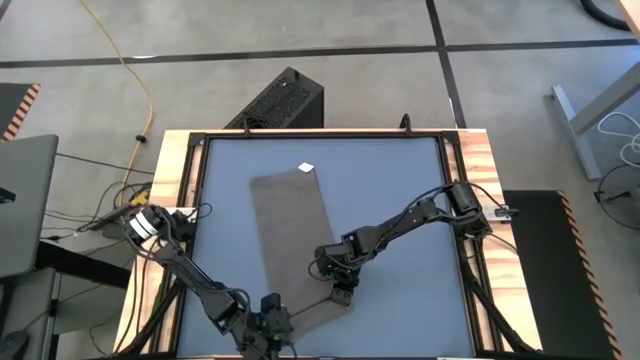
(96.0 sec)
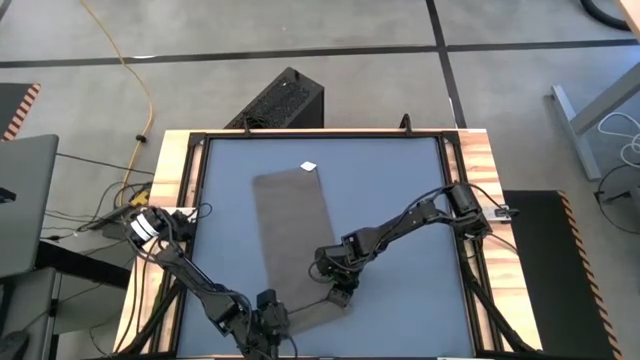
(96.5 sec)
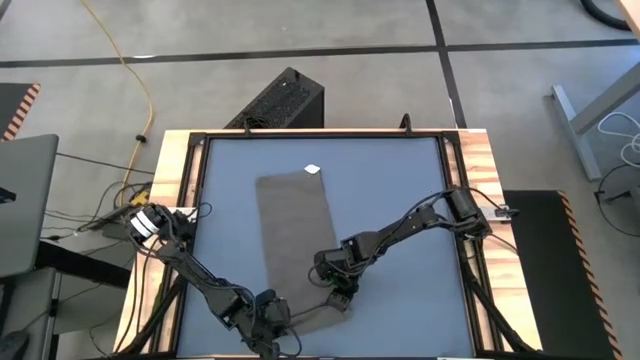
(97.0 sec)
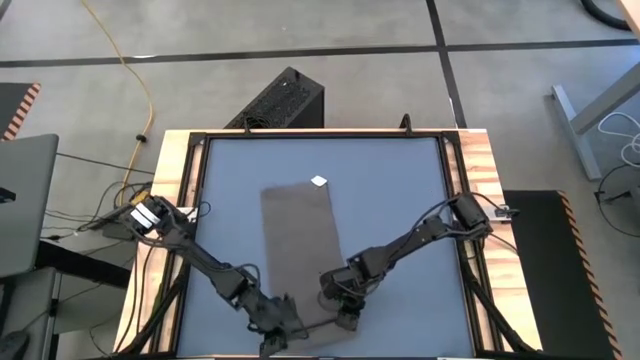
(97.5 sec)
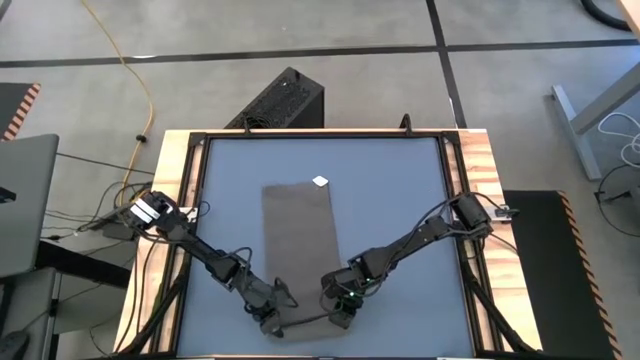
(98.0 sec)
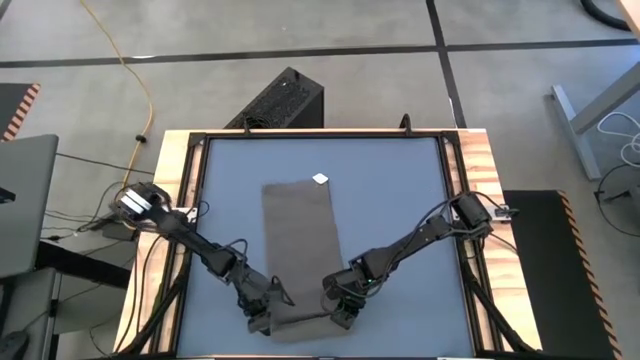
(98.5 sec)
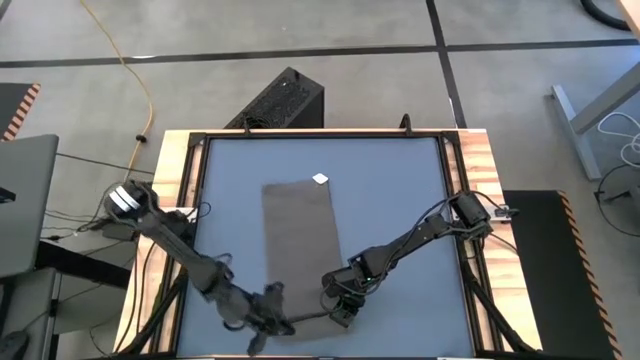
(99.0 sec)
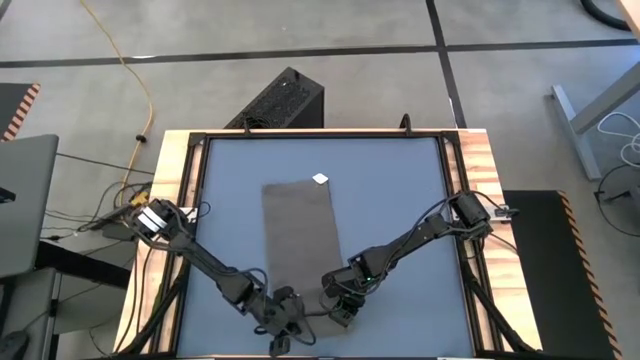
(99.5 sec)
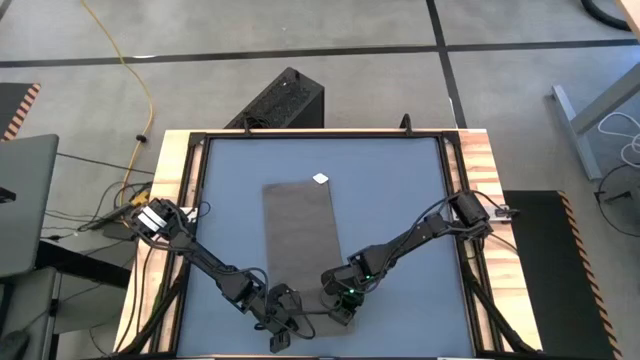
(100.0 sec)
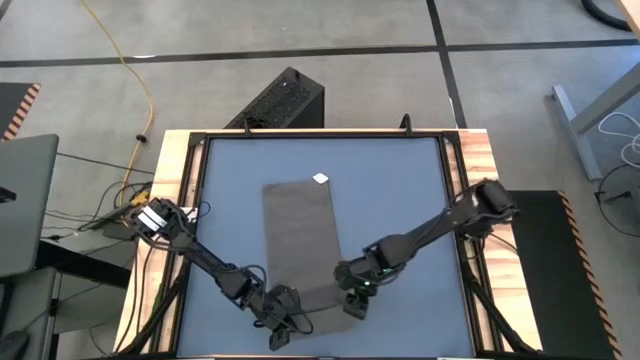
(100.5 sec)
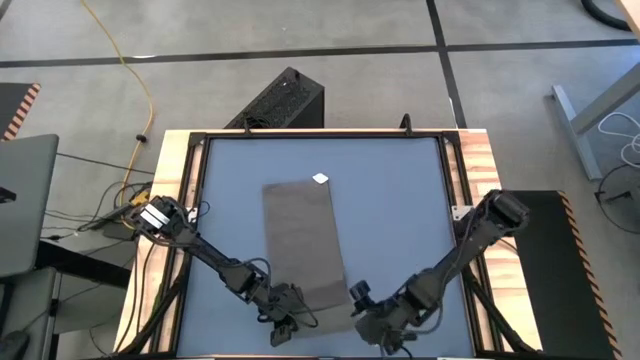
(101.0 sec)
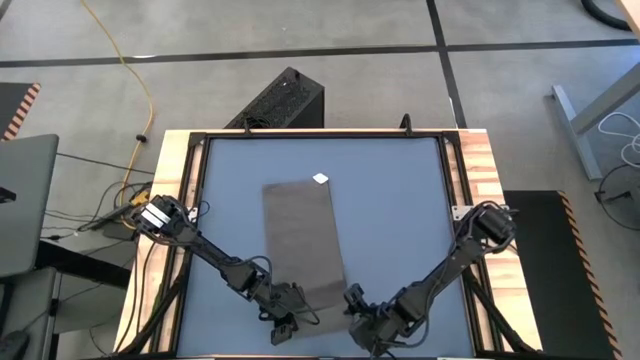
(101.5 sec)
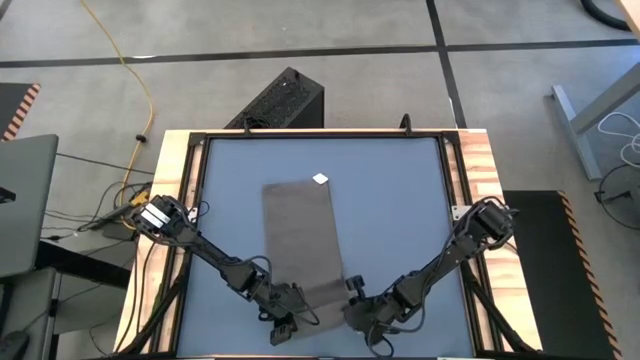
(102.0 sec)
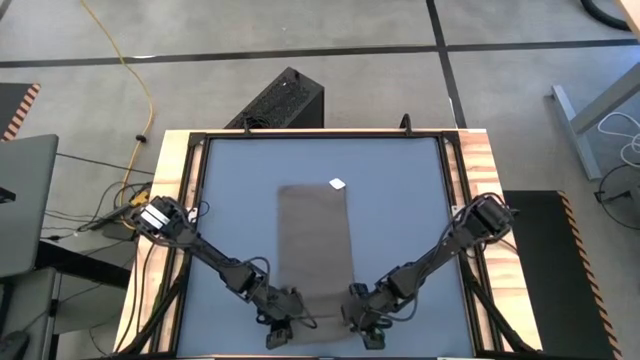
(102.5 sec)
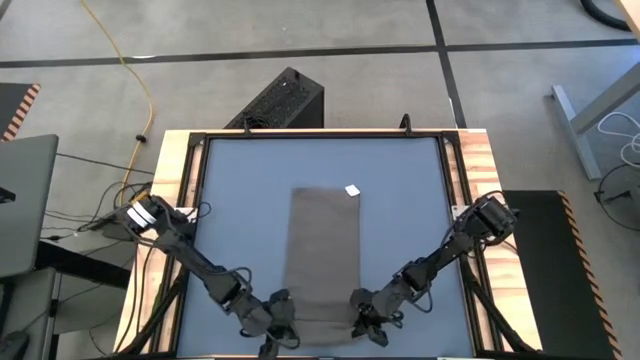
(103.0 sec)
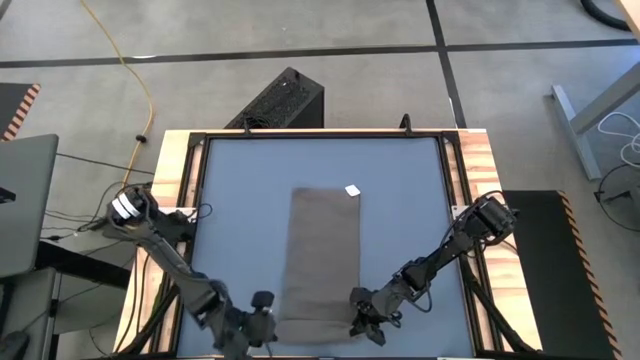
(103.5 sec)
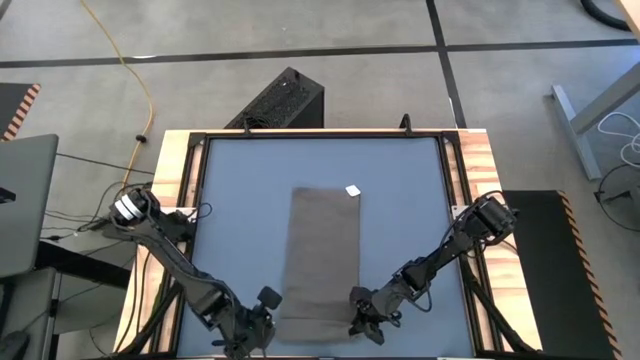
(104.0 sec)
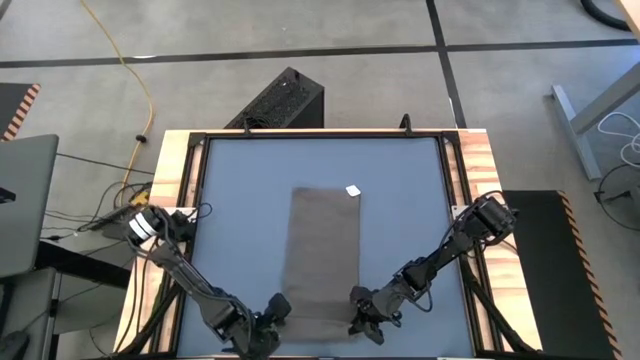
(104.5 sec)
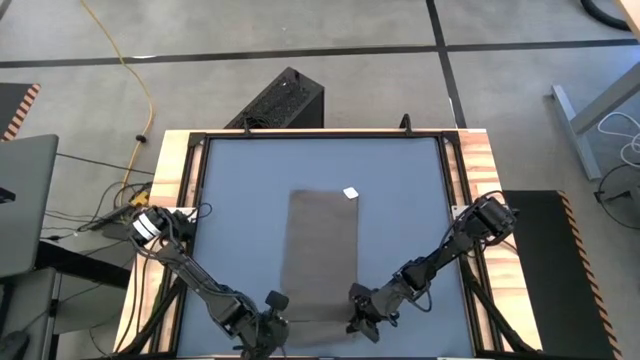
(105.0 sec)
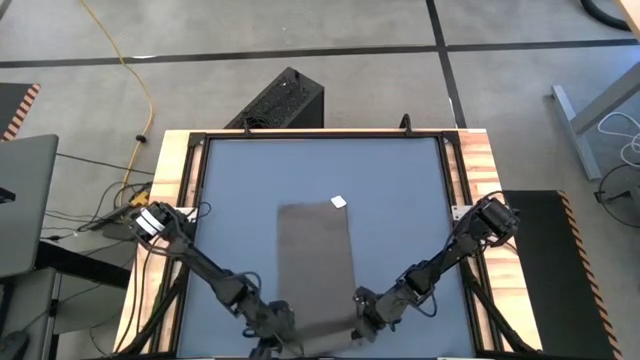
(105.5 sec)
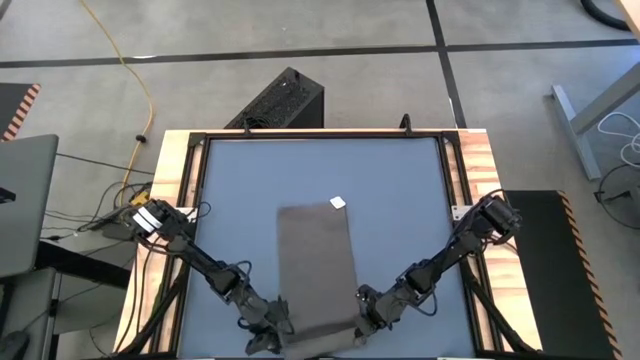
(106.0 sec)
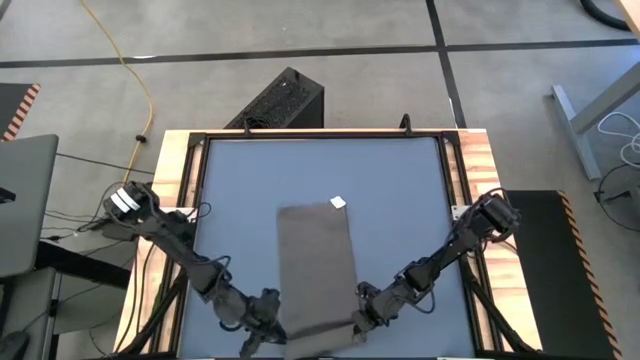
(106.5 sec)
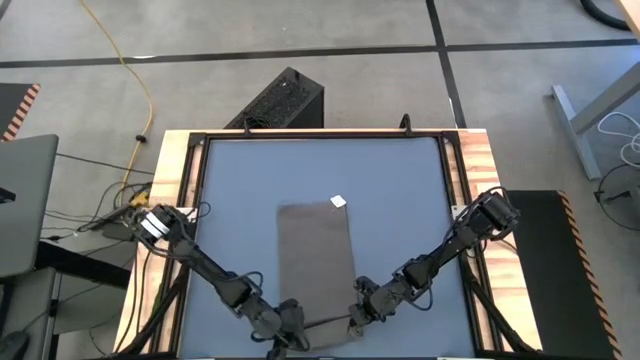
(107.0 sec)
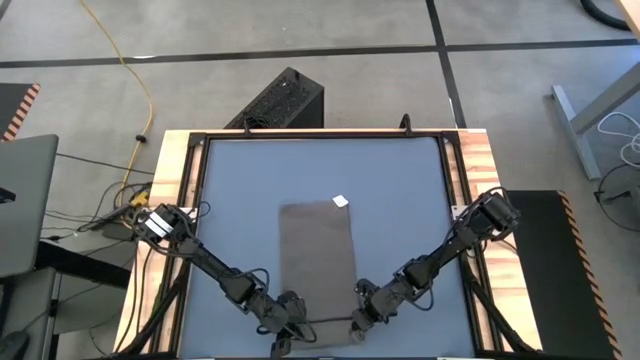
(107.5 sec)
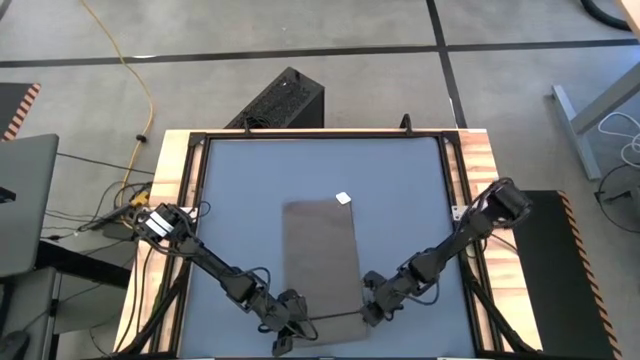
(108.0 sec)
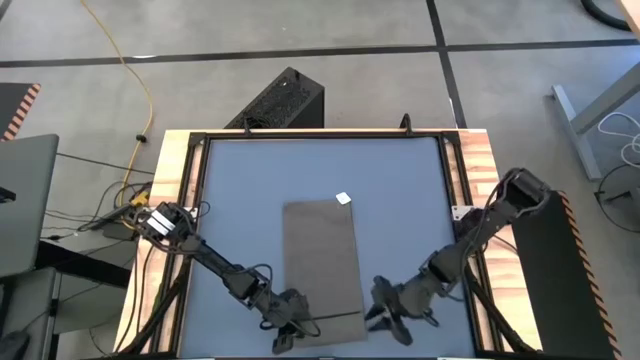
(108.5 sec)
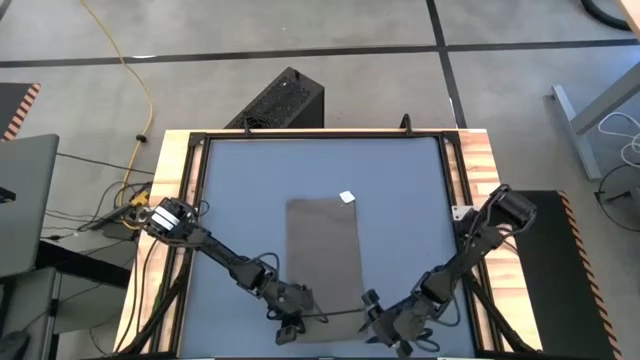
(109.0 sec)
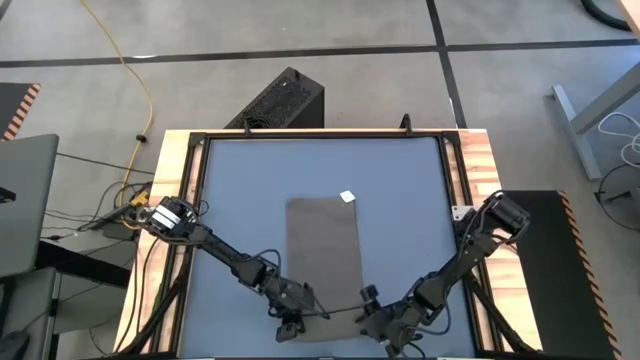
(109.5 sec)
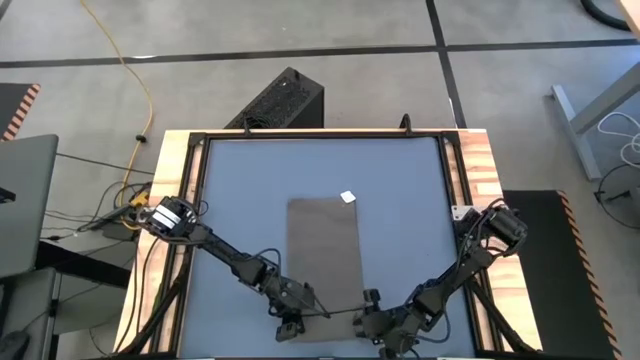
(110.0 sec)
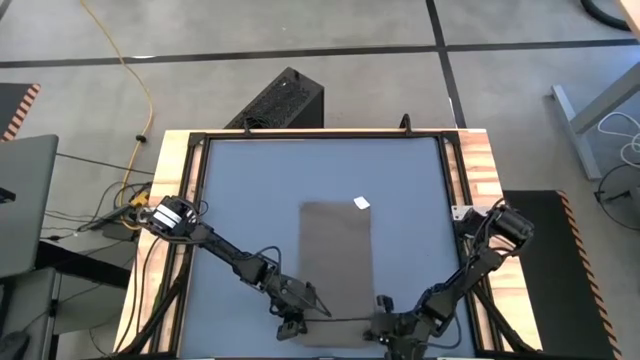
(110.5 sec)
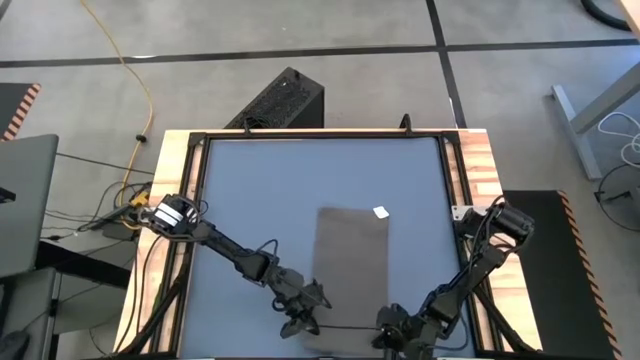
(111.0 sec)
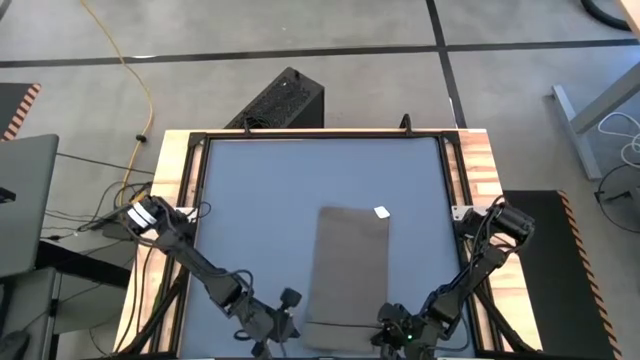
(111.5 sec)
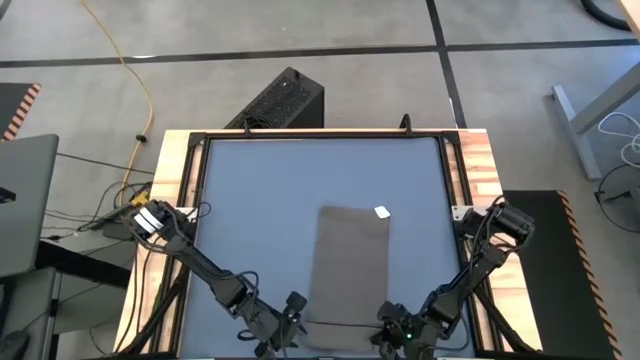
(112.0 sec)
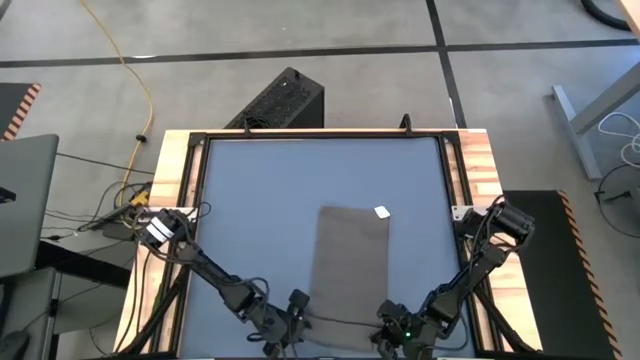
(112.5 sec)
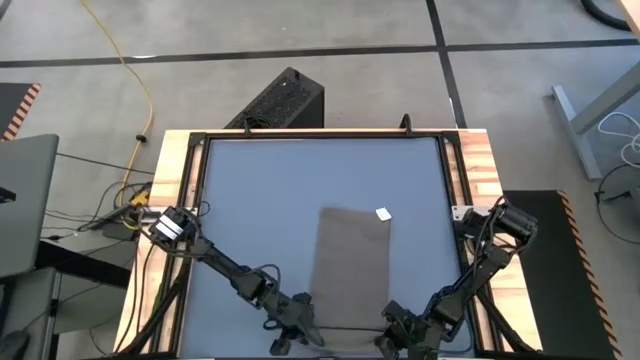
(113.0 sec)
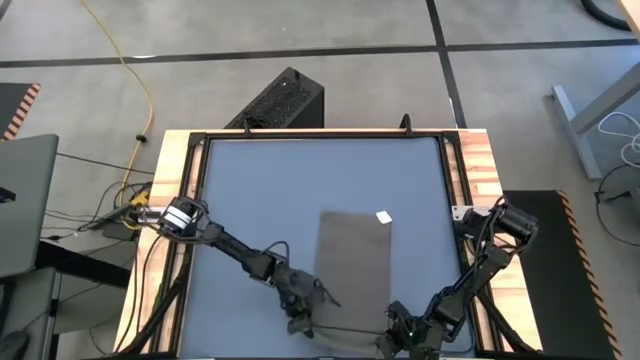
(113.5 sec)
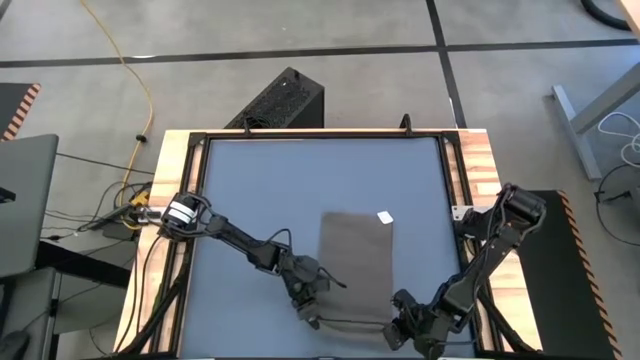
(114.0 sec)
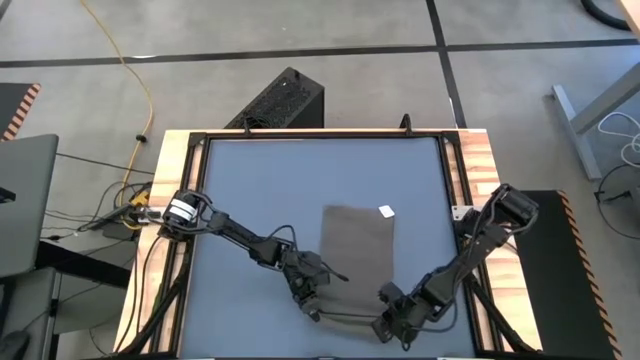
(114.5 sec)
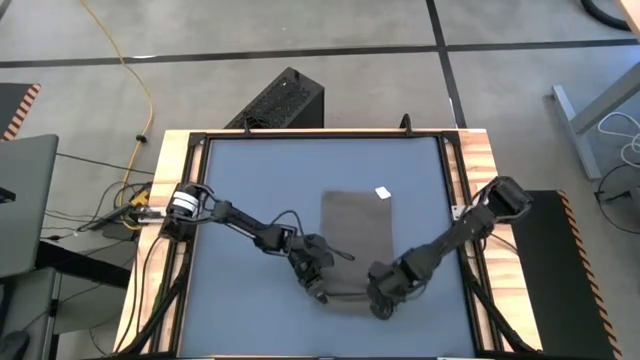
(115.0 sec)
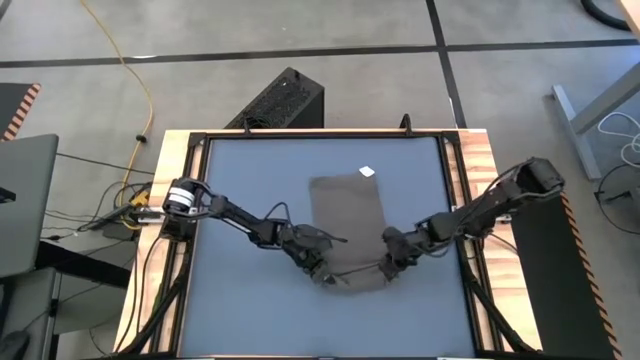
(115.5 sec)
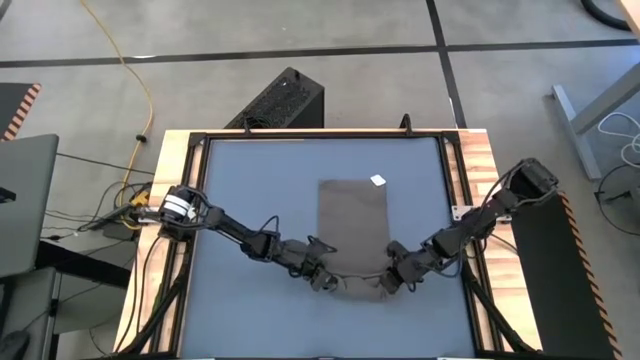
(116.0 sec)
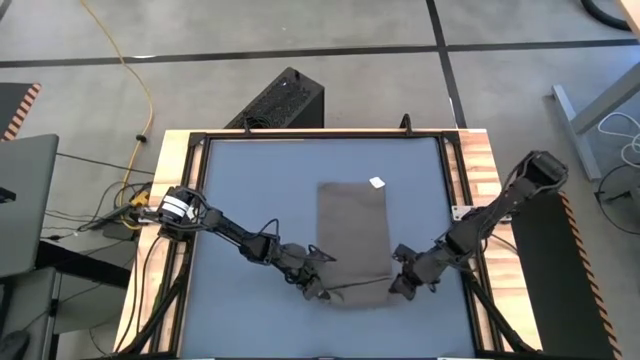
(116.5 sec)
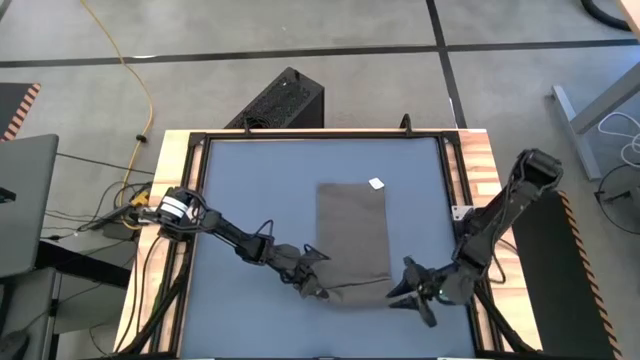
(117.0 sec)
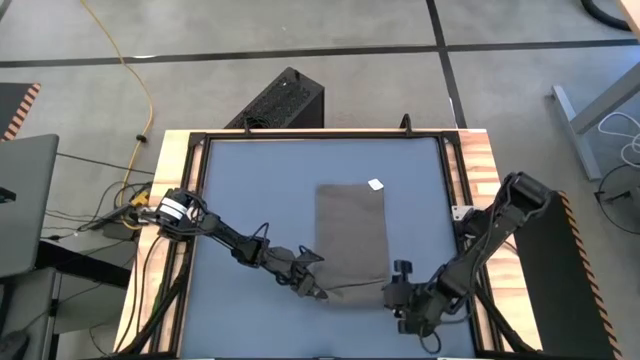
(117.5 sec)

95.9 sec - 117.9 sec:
Task: Roll towel
Roll the grey towel
